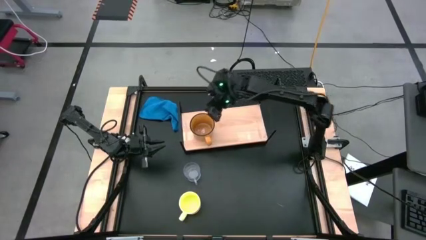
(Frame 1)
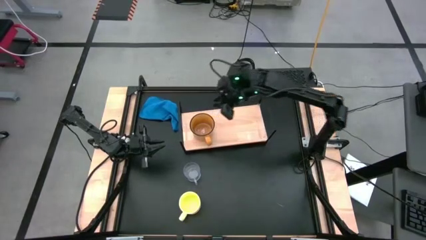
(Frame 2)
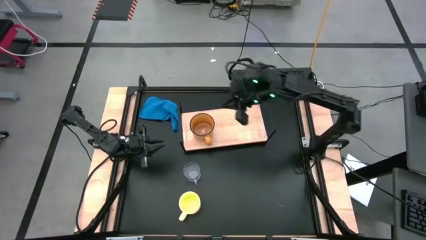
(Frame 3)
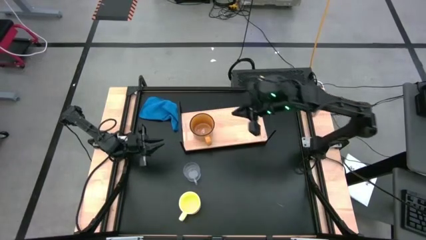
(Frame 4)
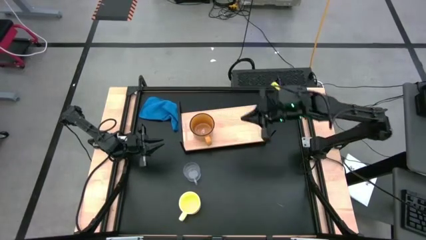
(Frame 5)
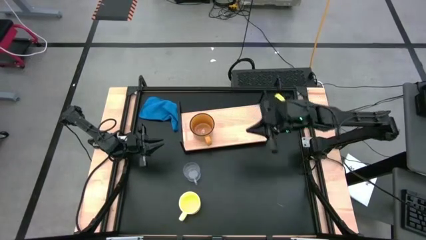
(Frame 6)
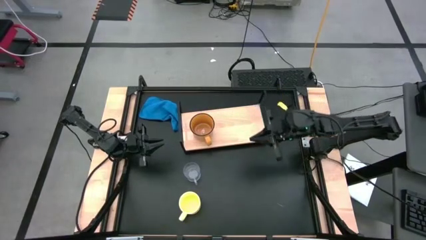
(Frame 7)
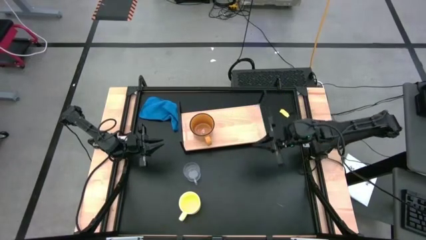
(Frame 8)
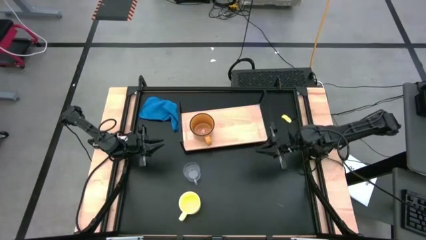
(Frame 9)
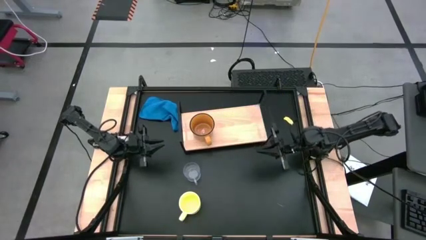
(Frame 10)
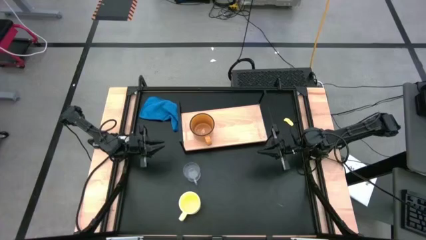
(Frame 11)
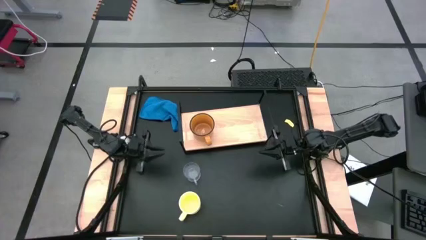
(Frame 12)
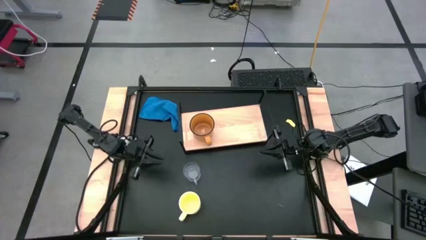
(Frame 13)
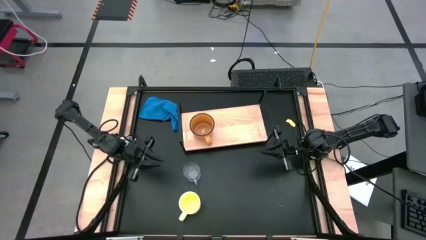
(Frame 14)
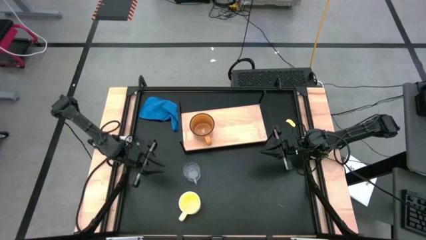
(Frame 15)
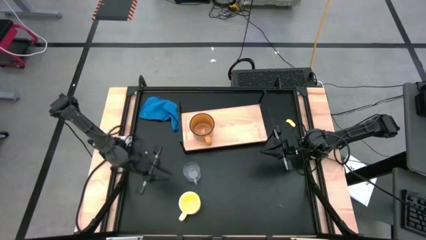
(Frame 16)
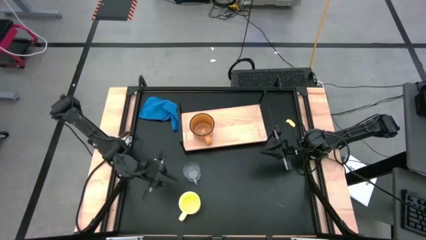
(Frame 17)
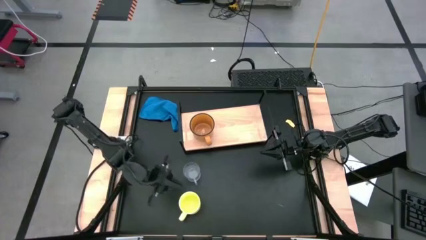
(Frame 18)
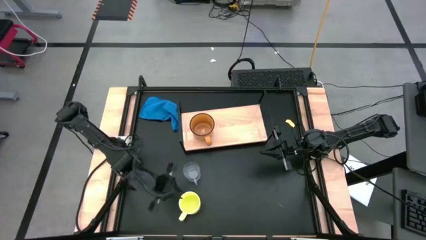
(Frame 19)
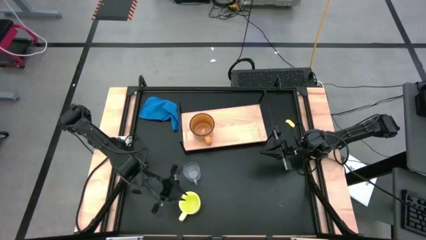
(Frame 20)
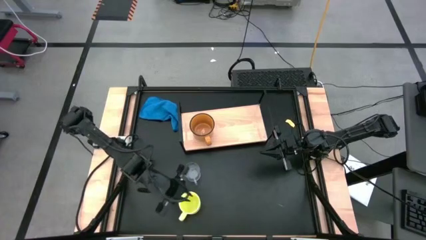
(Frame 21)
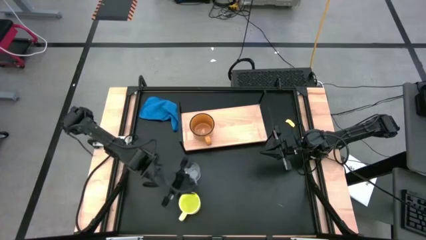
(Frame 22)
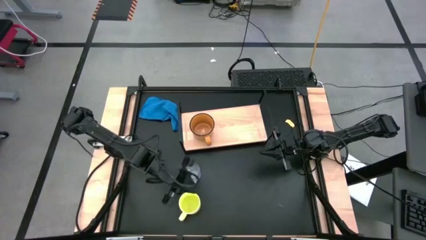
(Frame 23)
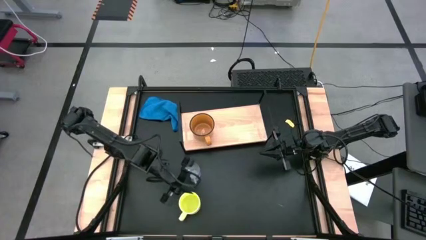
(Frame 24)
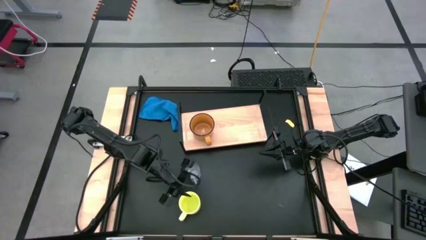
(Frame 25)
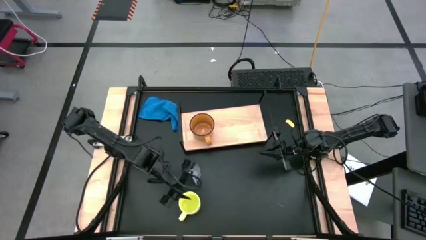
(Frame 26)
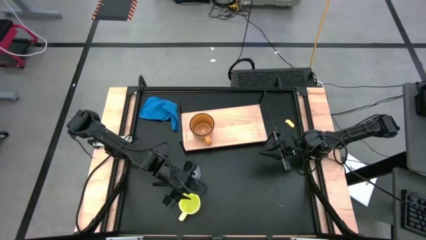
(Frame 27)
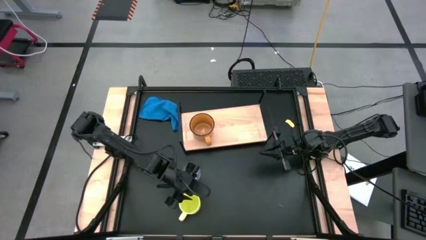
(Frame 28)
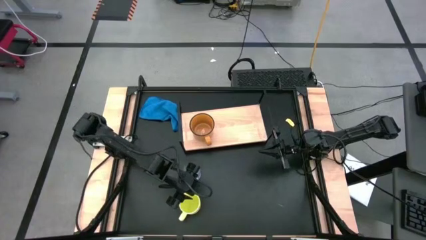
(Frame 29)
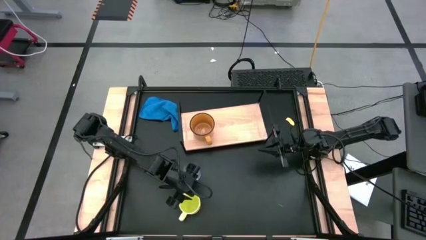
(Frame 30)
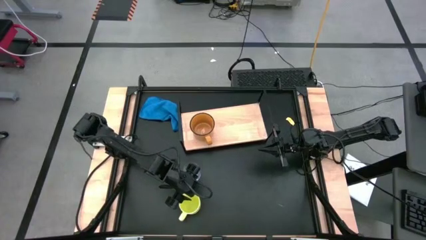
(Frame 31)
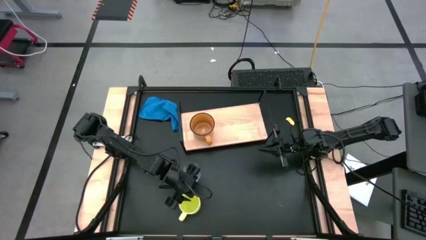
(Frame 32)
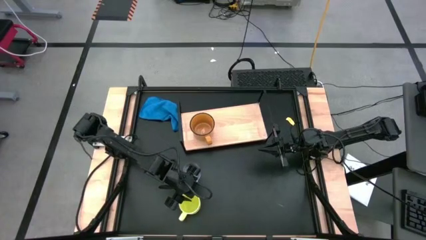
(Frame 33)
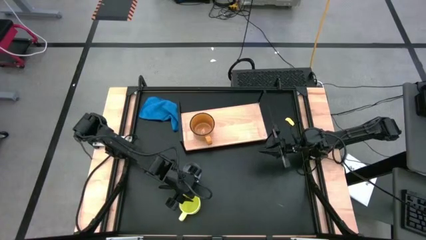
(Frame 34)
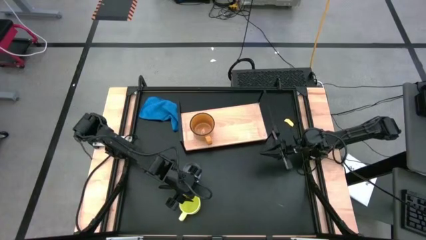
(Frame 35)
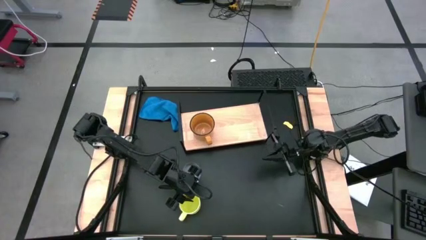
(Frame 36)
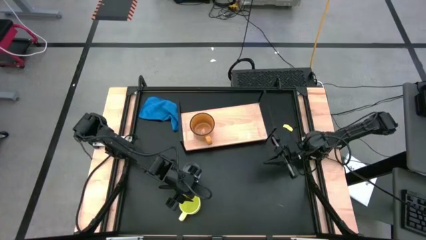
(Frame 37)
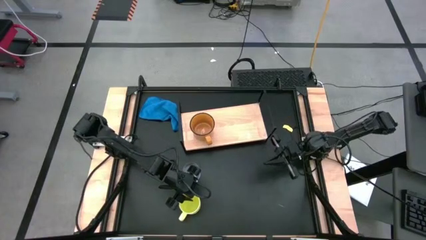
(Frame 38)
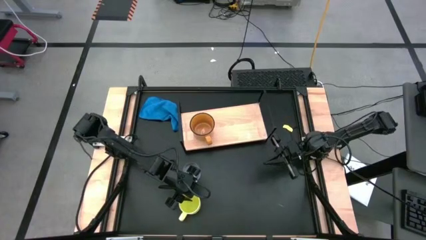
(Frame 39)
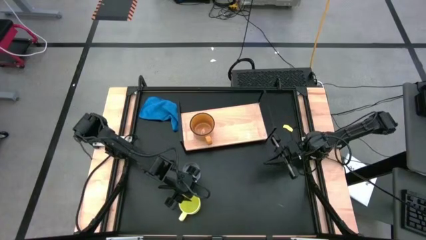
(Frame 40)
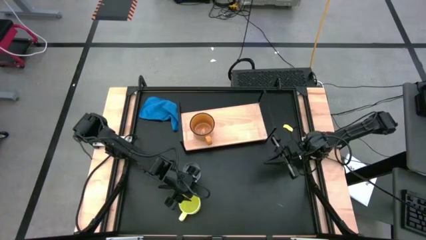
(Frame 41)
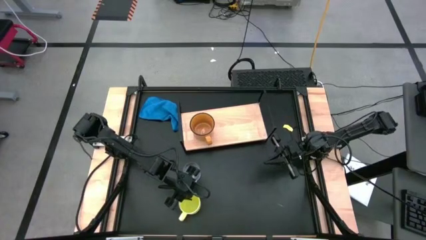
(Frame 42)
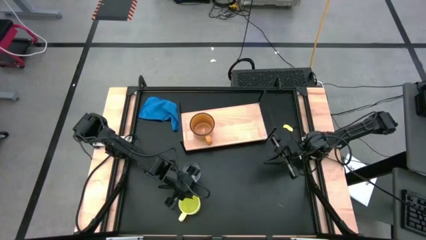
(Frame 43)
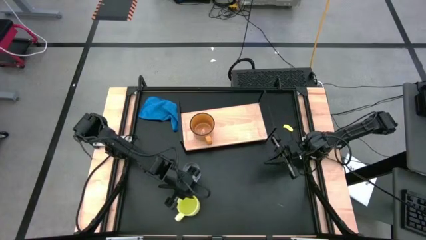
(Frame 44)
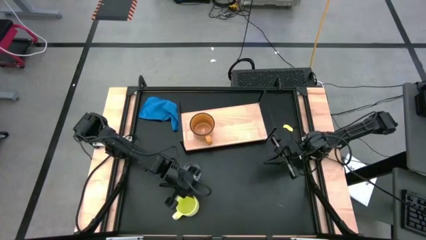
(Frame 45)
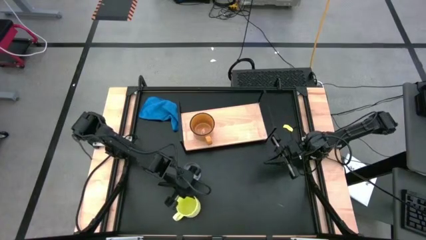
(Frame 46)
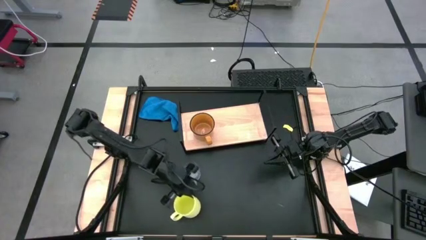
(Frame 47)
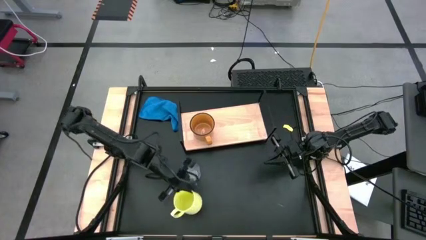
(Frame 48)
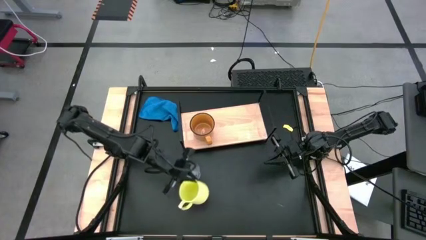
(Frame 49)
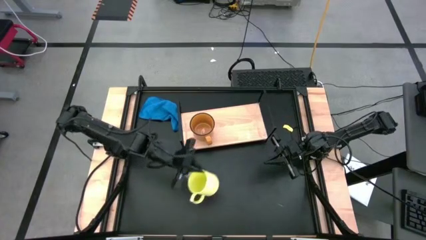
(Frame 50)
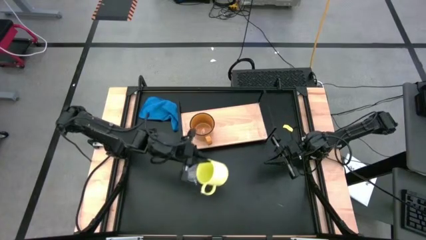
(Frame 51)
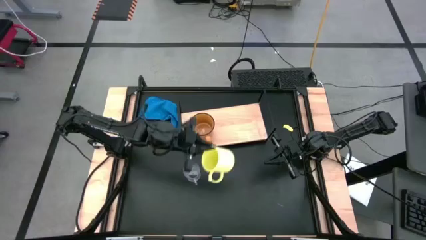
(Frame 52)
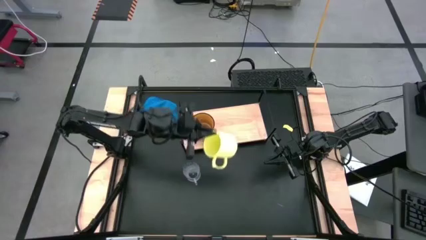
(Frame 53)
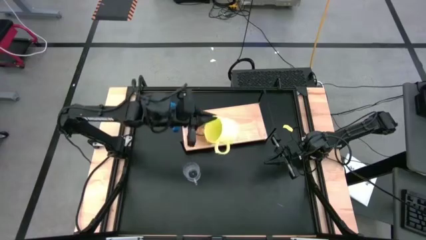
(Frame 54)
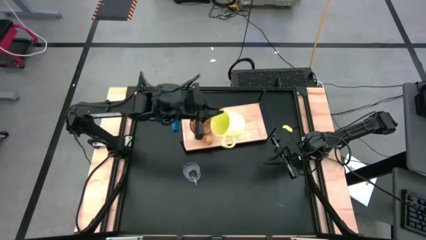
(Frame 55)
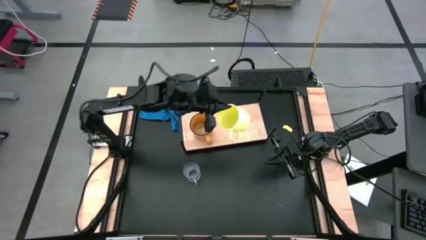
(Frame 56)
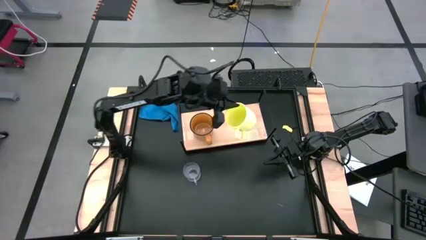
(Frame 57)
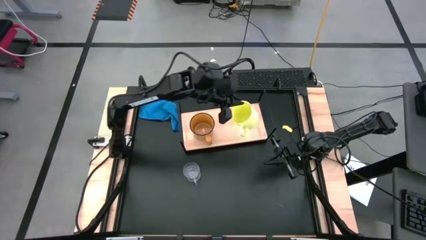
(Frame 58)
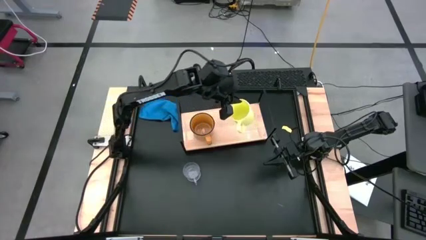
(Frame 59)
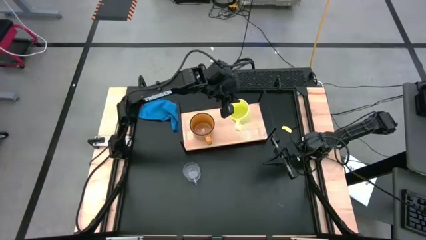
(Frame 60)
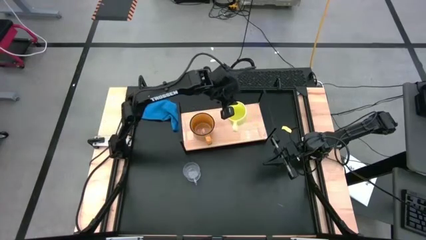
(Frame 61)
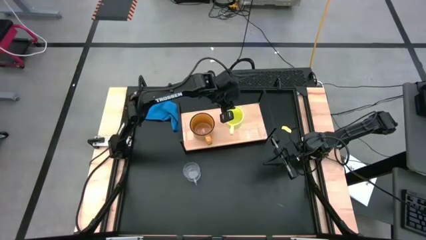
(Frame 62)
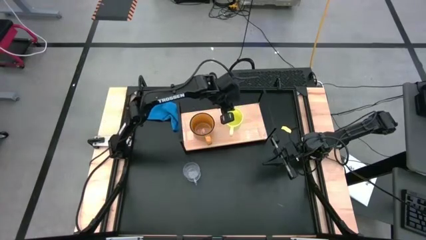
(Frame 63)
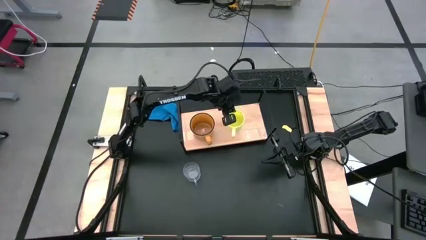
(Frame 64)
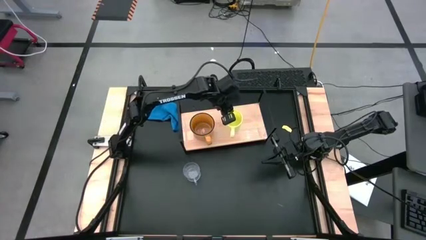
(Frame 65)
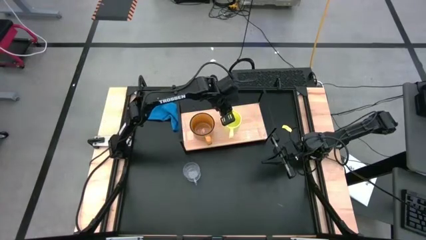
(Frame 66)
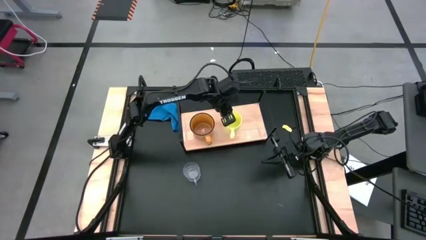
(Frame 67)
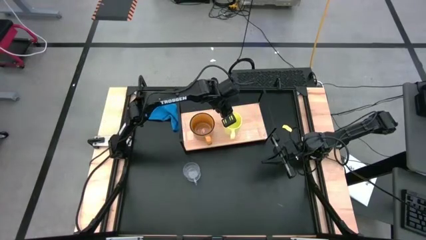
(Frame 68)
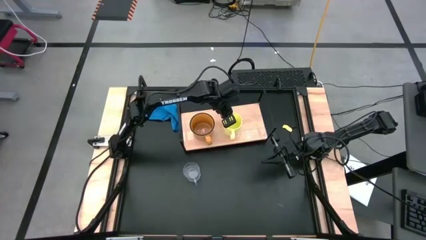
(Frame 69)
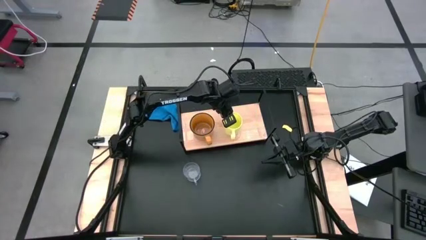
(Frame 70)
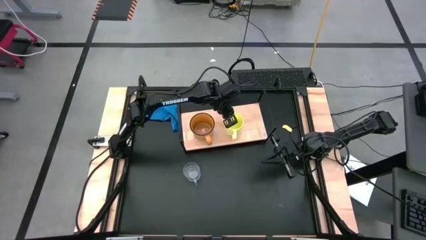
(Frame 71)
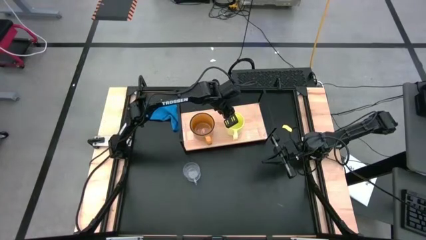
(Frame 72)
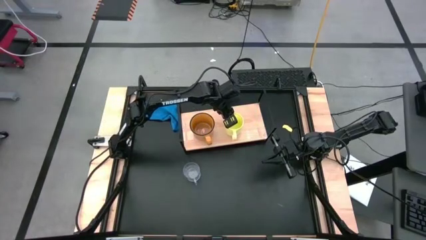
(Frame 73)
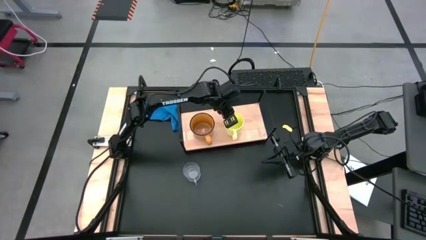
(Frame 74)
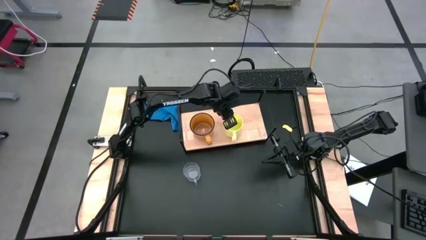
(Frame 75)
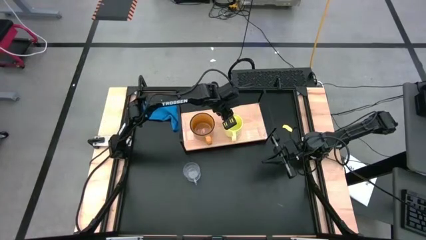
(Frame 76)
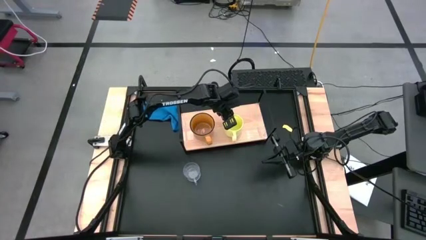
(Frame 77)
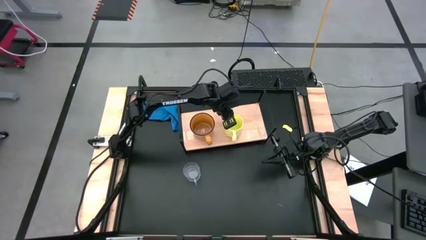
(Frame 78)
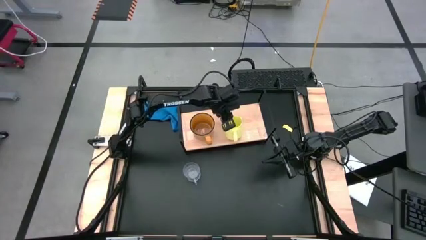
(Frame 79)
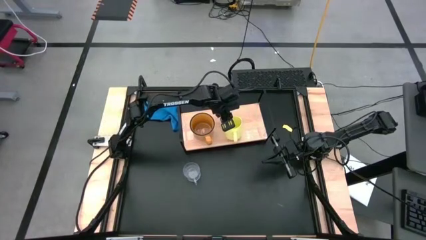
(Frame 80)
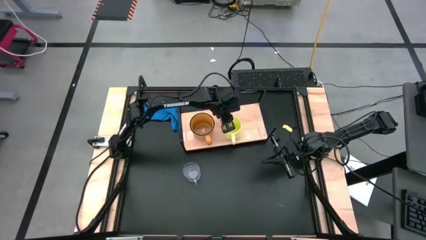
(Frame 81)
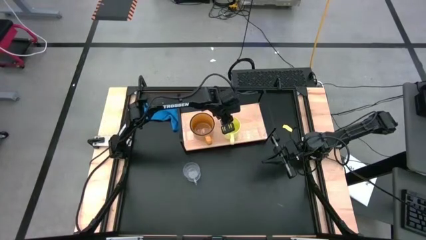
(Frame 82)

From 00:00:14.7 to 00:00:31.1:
Task: Stack small to large cups/mugs on shelf
Put the yellow mug on the shelf
